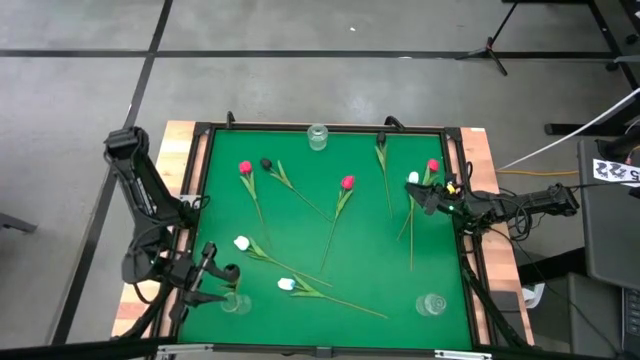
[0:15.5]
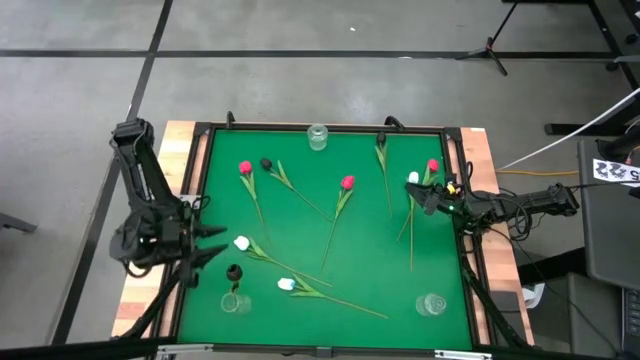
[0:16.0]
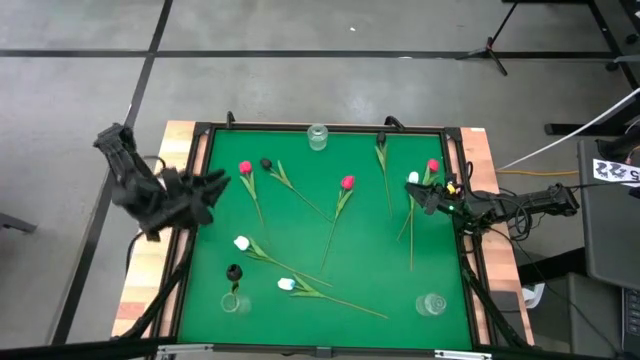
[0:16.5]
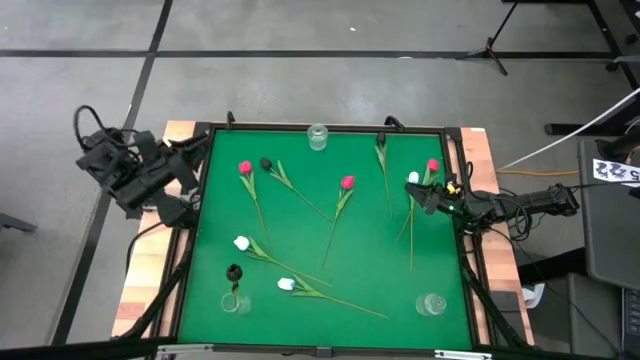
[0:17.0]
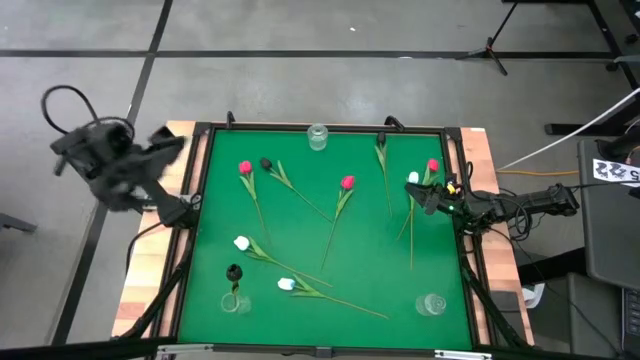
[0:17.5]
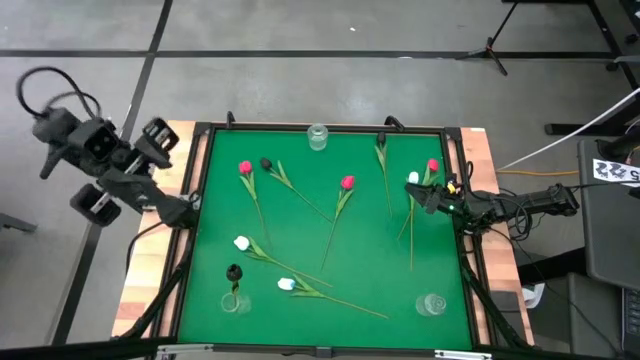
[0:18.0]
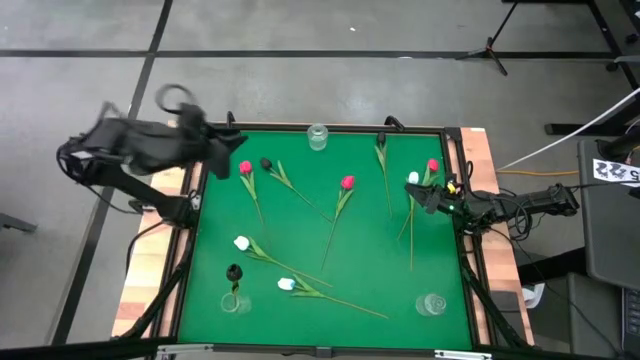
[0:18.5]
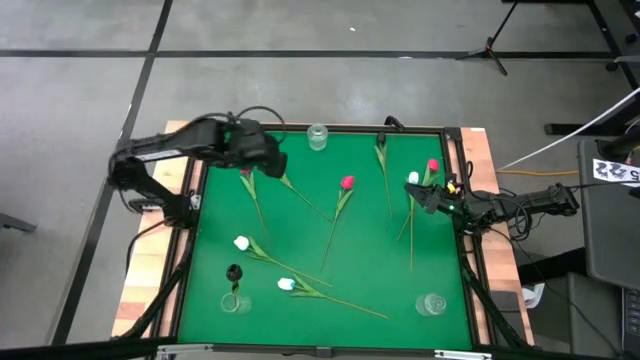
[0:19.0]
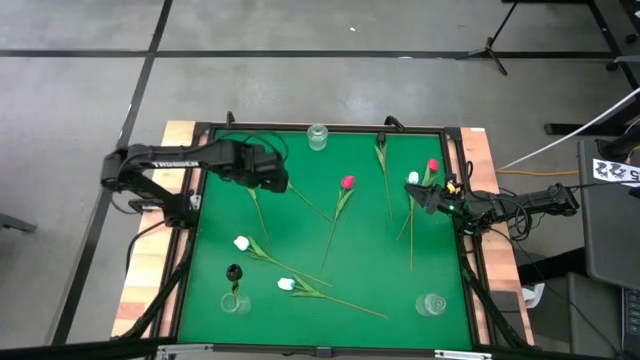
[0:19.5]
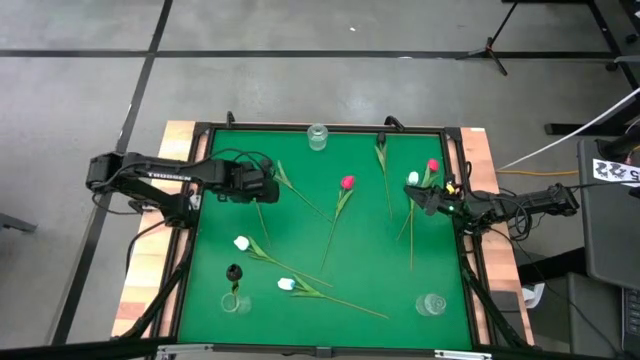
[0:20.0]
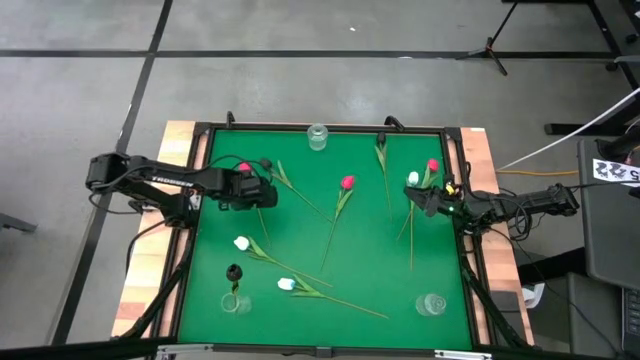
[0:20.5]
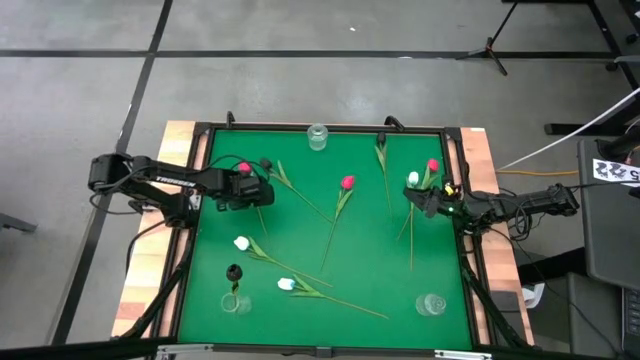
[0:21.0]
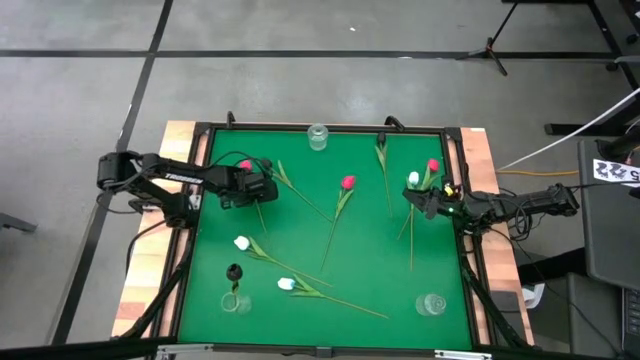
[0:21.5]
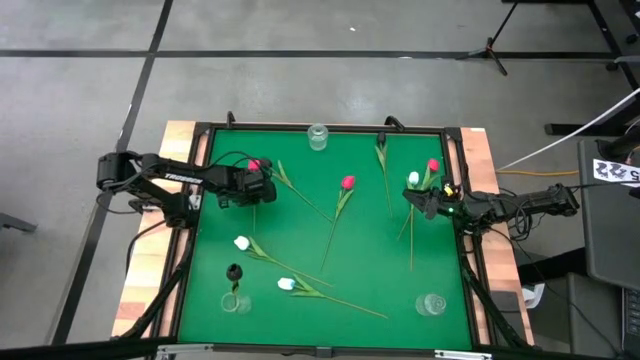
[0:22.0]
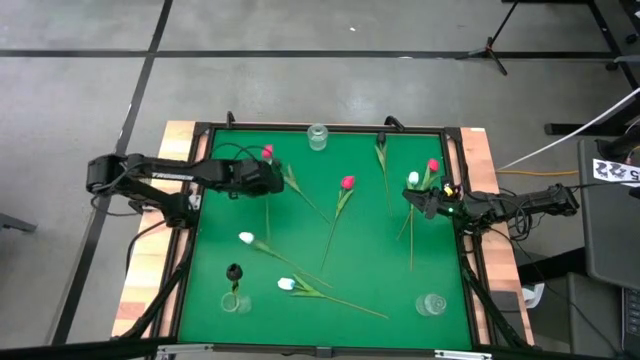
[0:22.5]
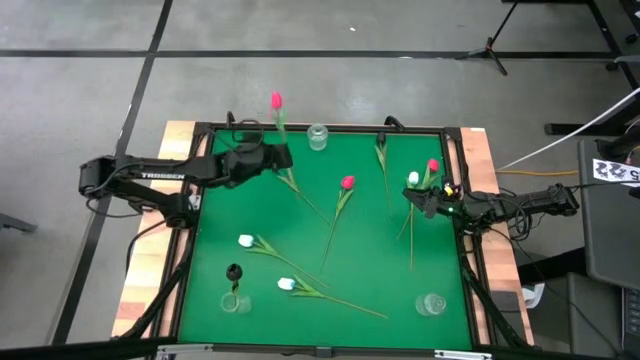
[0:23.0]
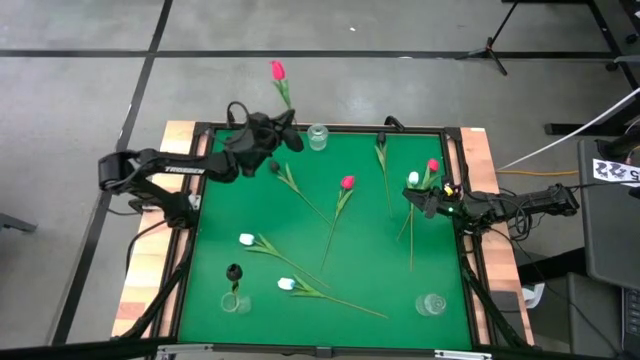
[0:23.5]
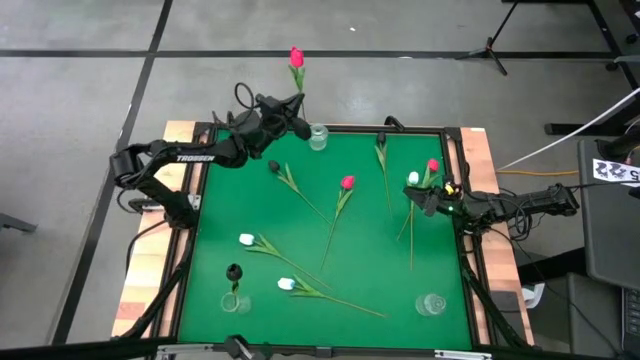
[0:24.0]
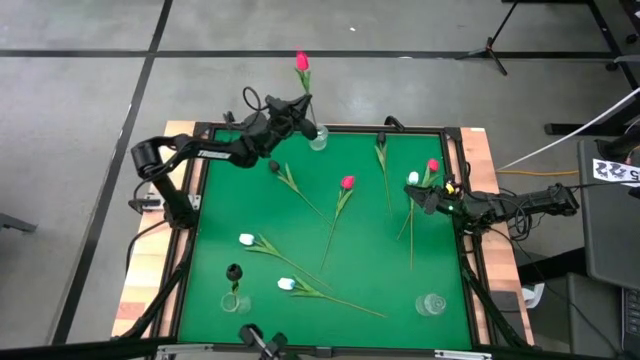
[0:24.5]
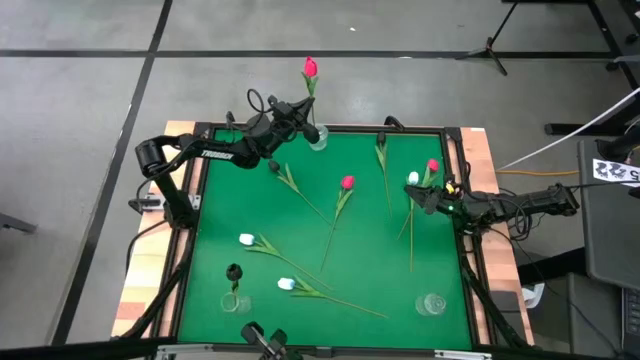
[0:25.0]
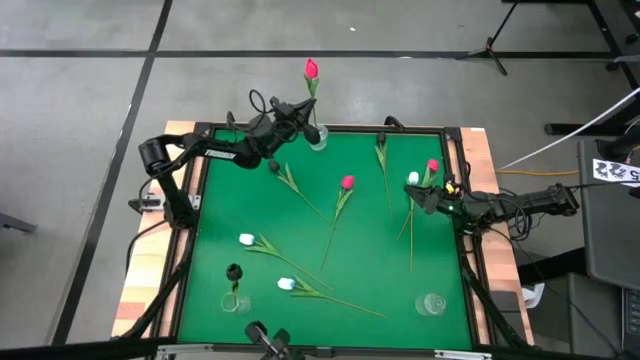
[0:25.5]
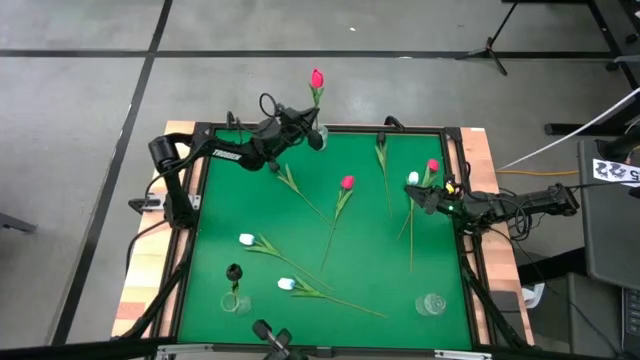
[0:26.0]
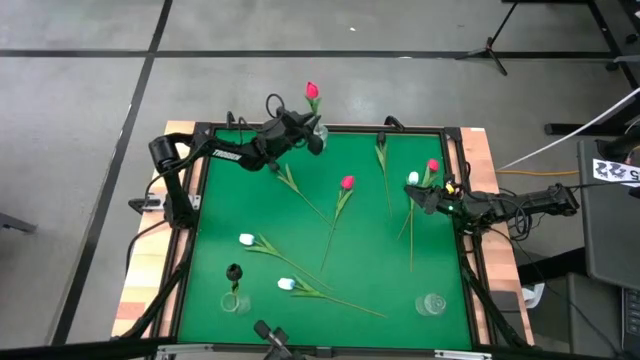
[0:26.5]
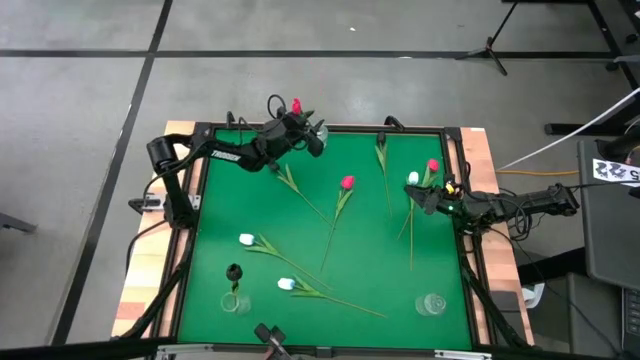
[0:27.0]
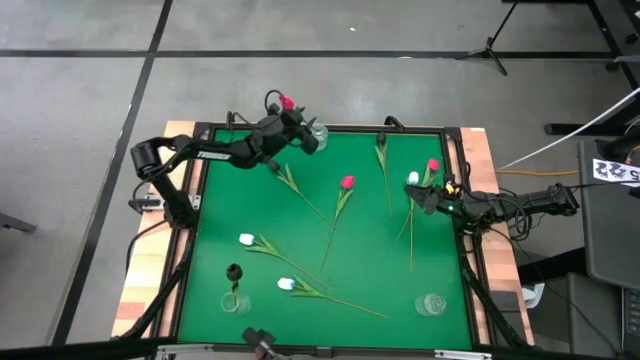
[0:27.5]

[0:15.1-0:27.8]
Task: Sort flowers into vase by color
Put the left pink flower into the top transparent vase

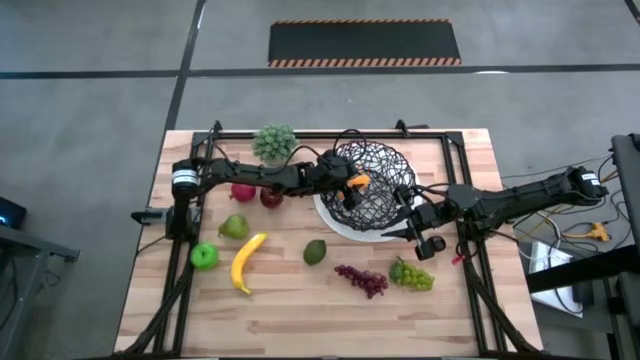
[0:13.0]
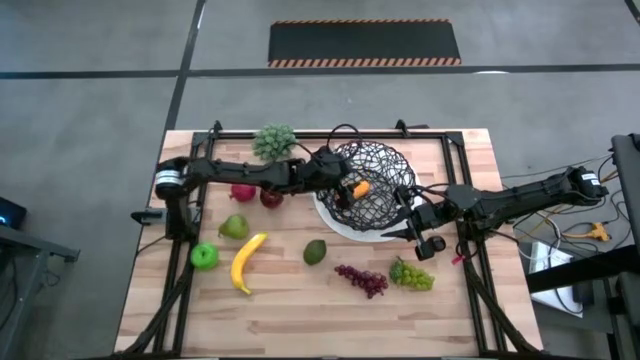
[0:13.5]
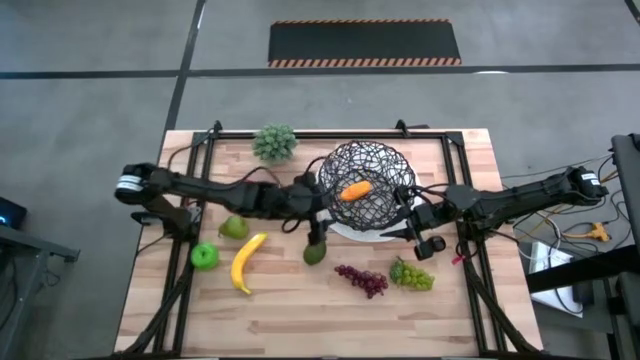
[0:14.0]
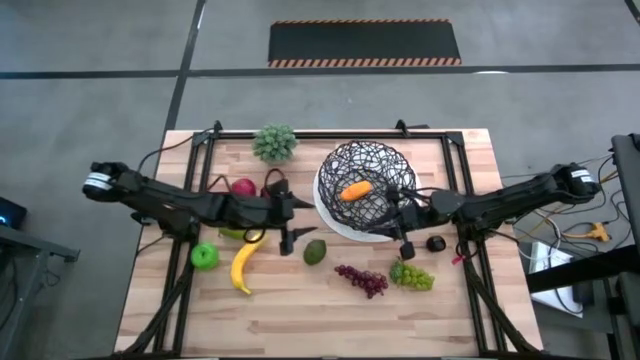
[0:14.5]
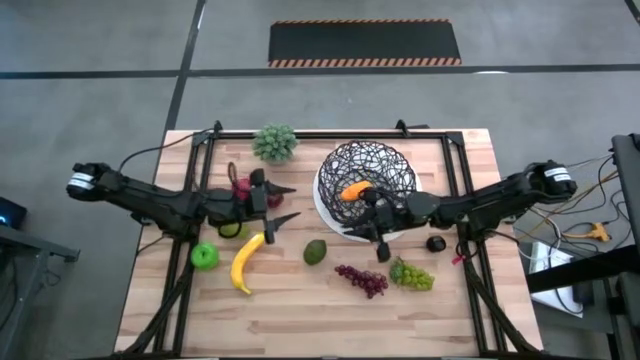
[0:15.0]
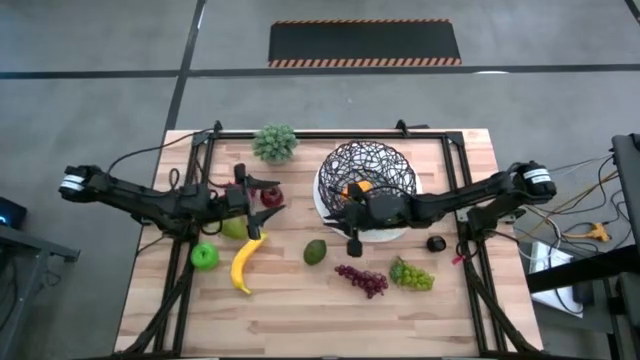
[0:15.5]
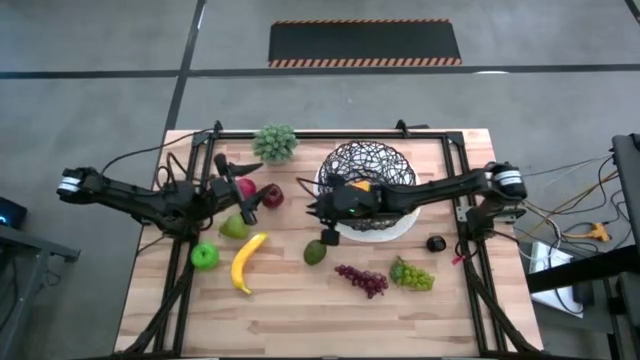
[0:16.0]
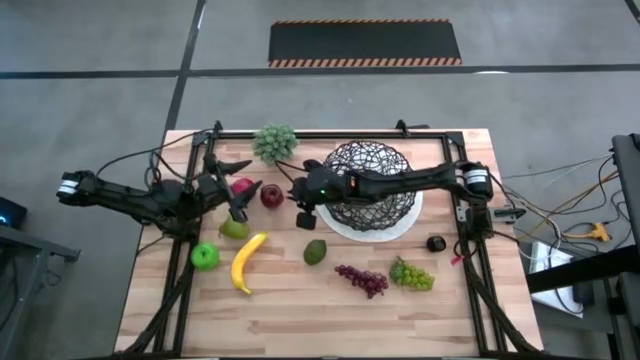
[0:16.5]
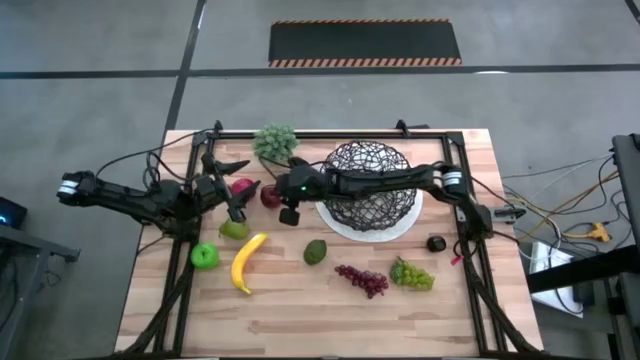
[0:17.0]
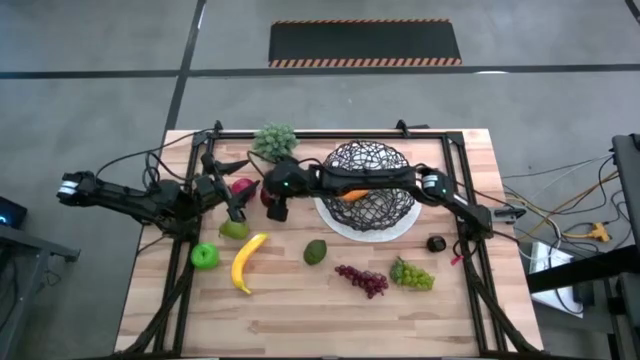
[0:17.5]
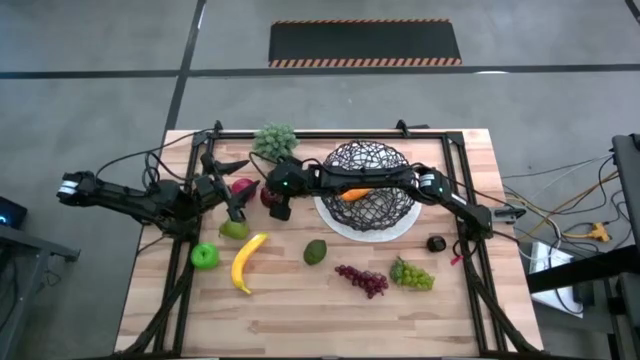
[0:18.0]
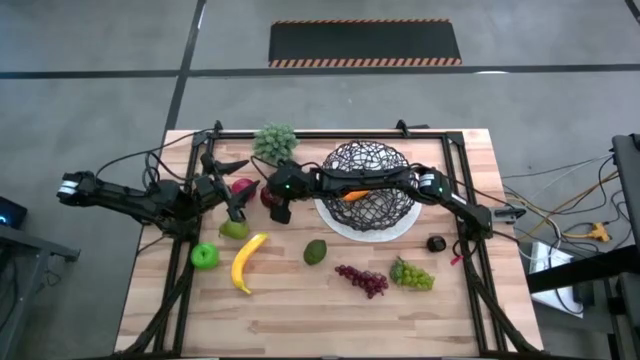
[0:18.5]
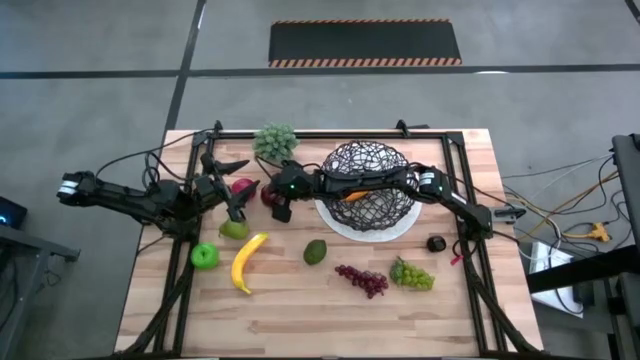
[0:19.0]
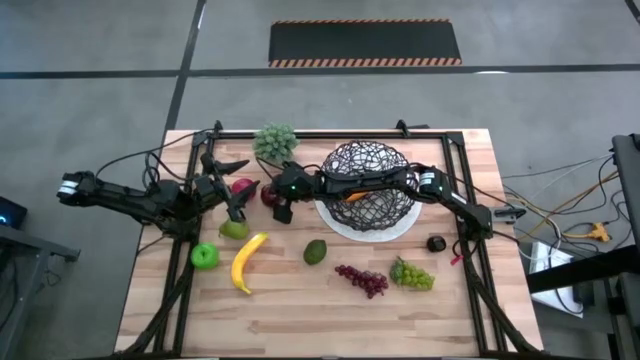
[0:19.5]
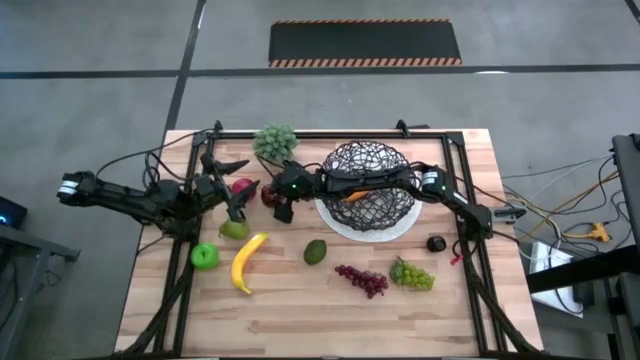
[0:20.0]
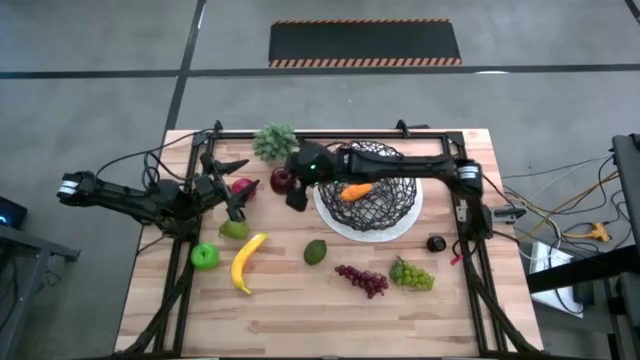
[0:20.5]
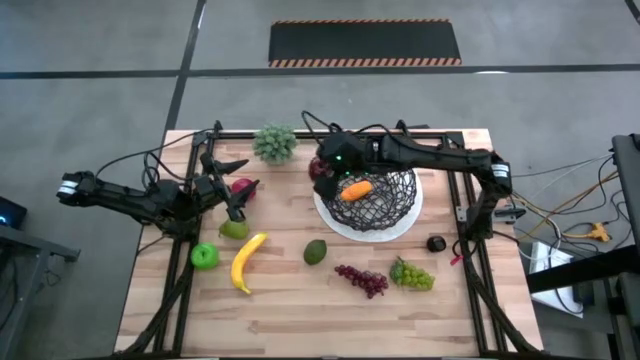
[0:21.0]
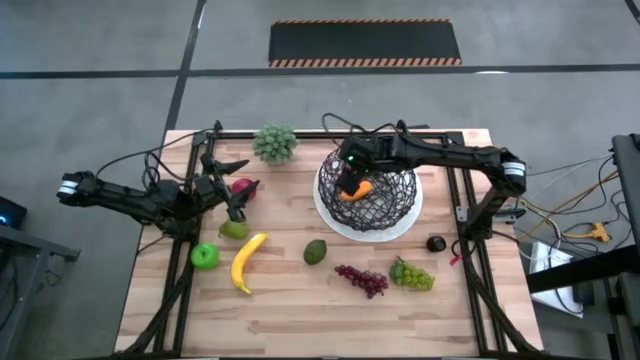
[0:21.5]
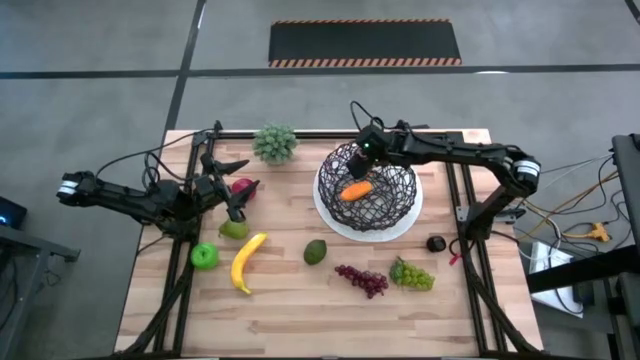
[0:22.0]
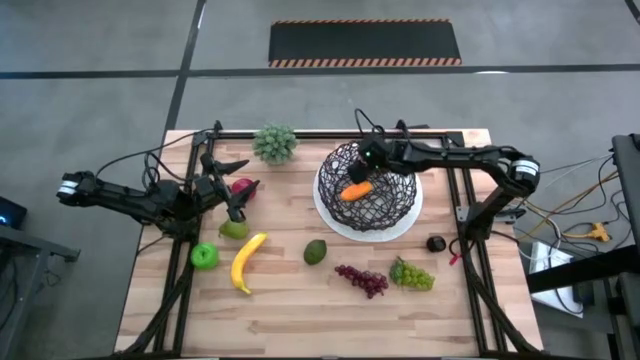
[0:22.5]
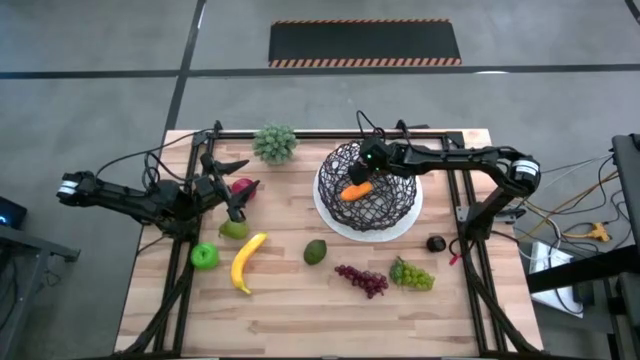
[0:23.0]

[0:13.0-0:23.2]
Task: Build produce basket
Put the red apple into the black wire basket
